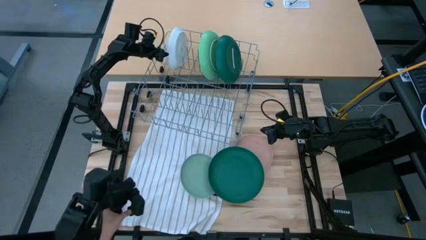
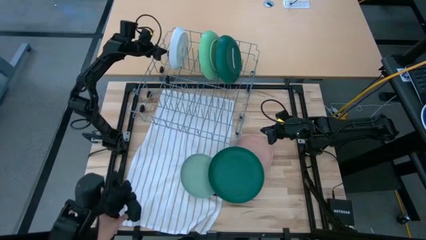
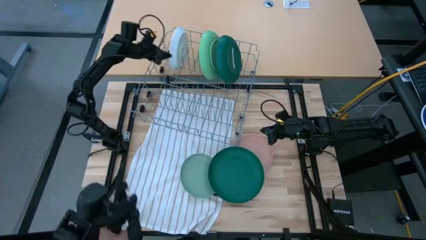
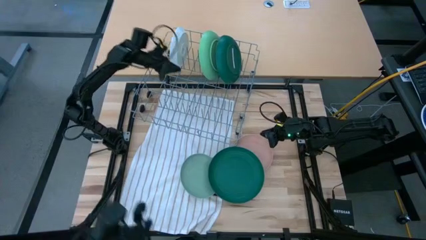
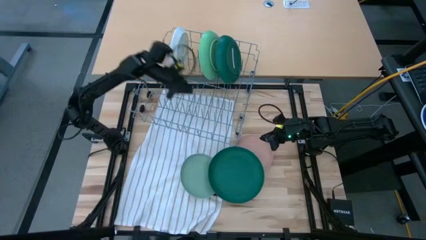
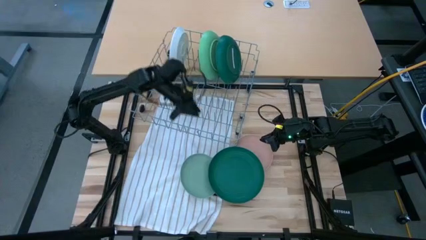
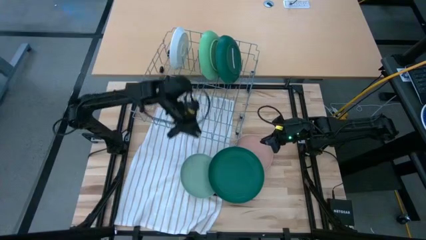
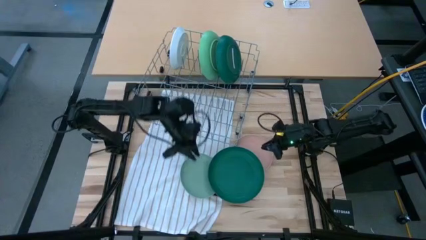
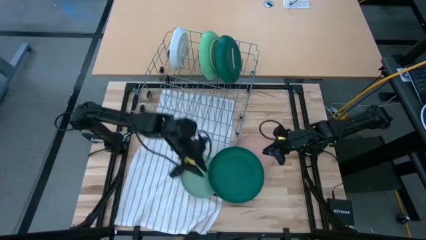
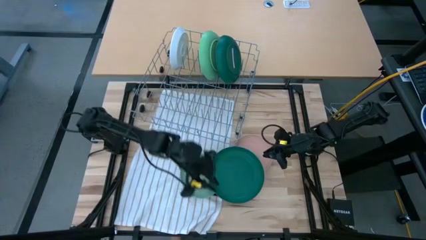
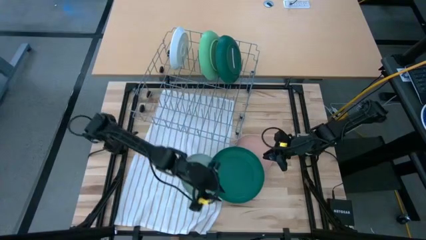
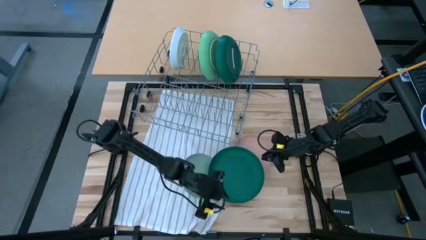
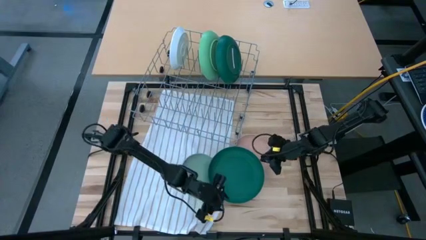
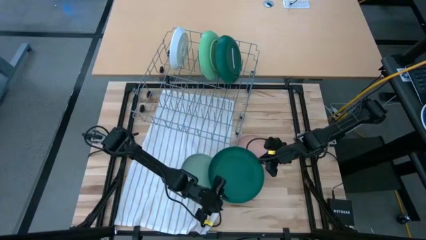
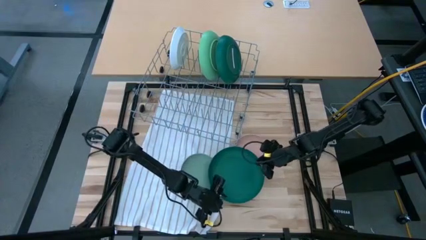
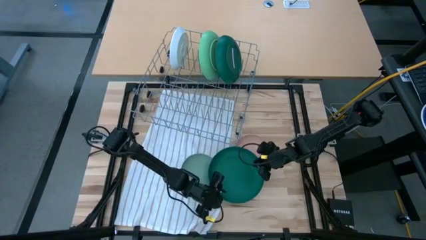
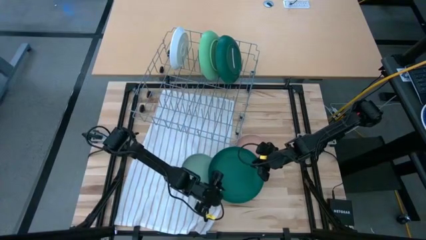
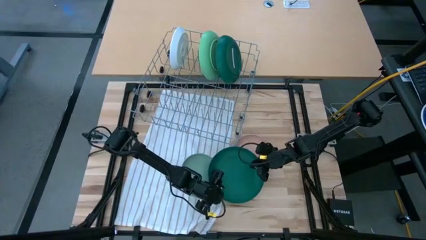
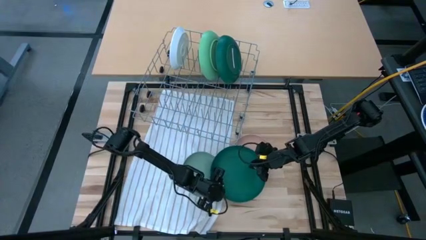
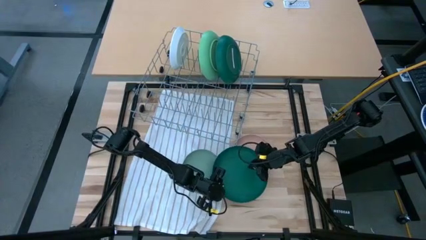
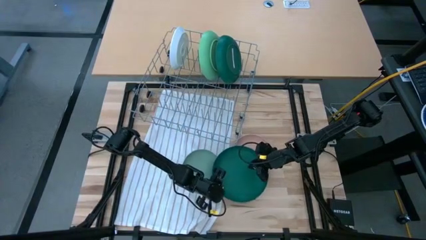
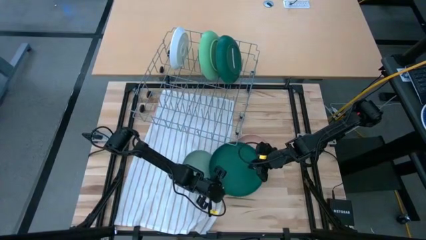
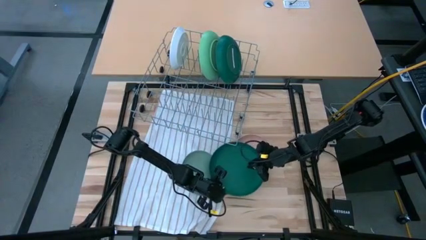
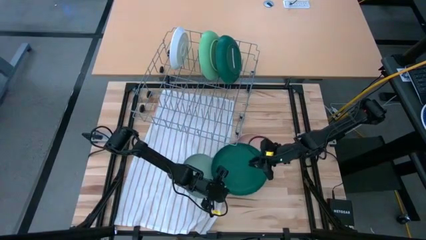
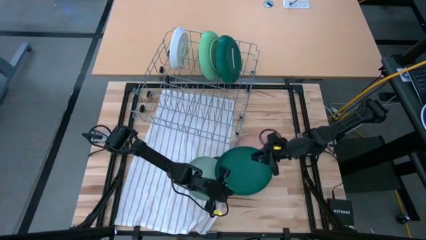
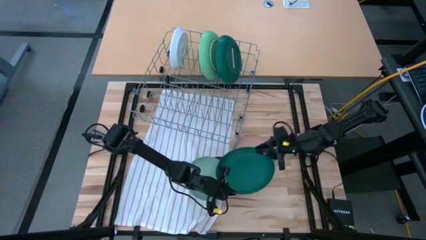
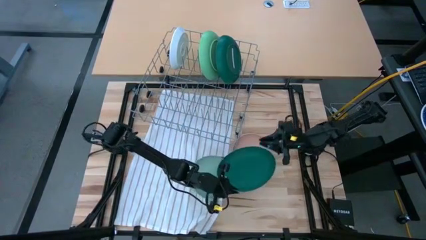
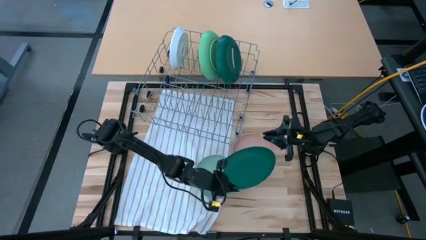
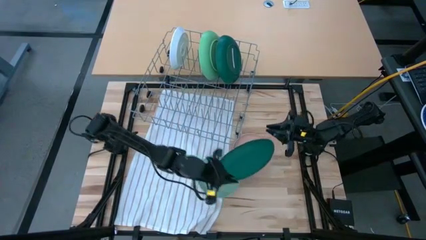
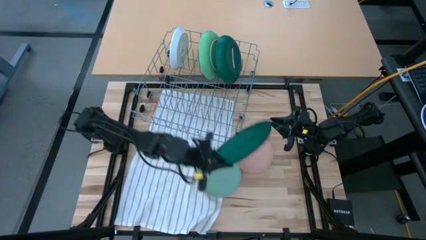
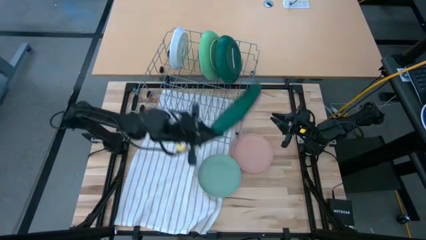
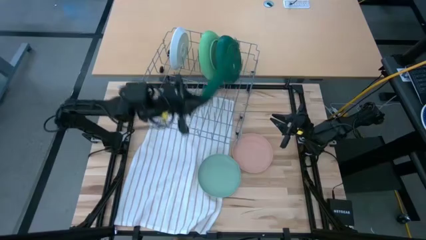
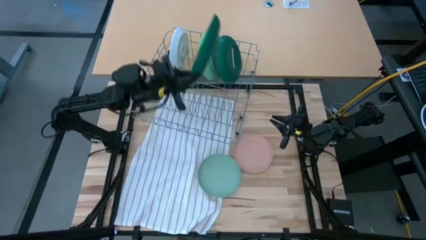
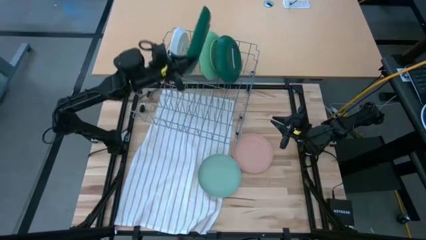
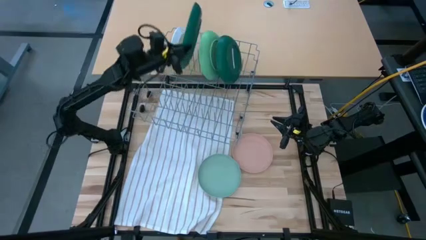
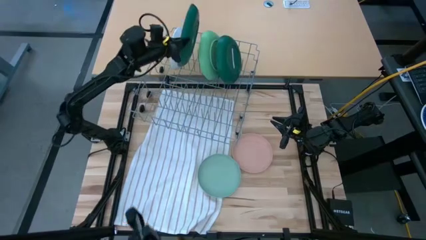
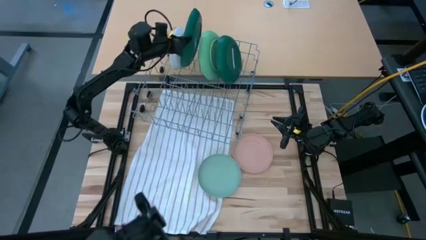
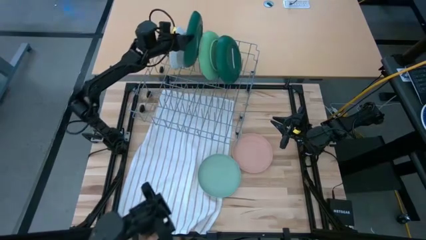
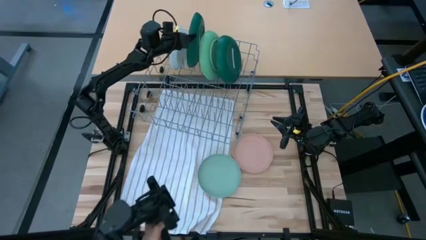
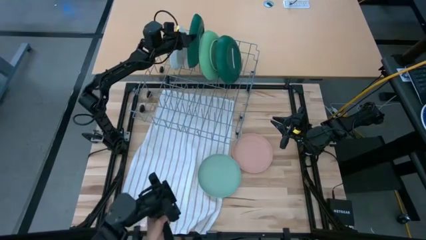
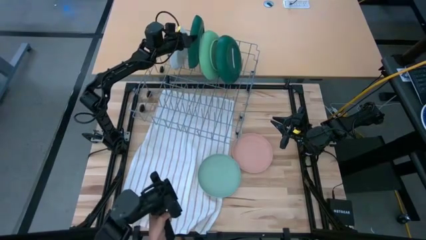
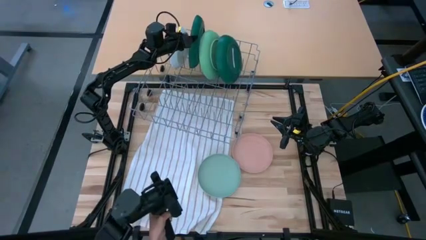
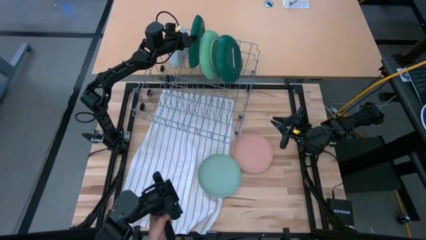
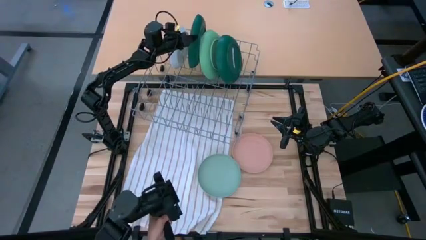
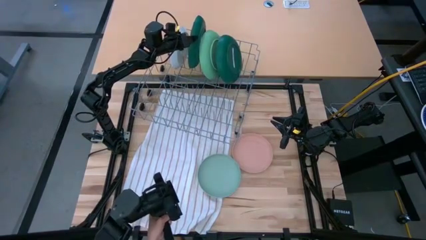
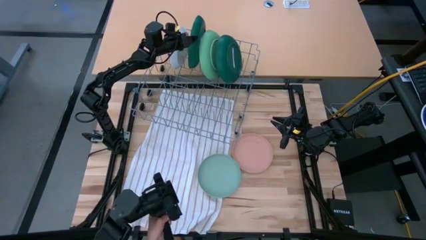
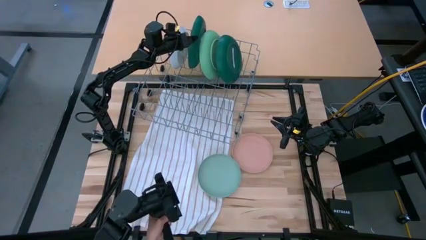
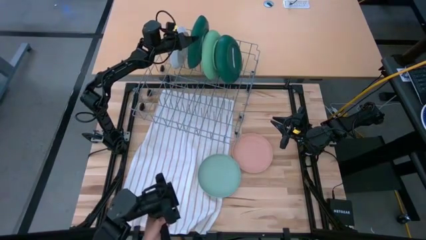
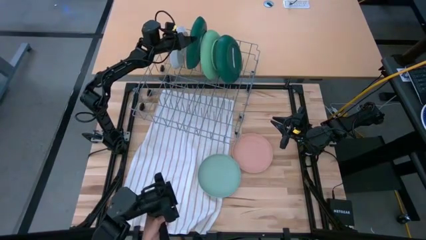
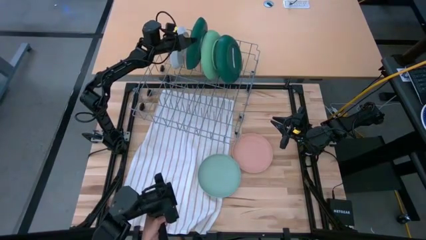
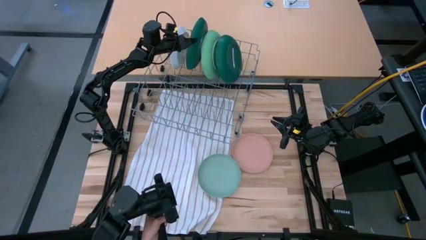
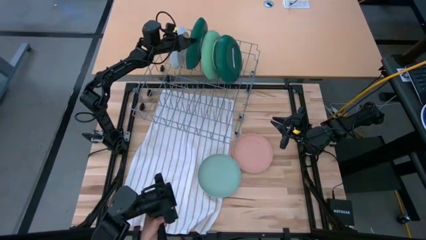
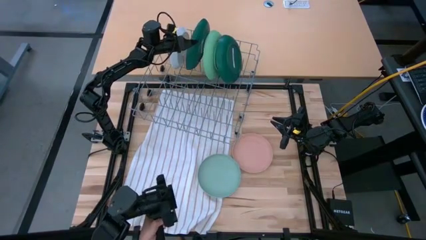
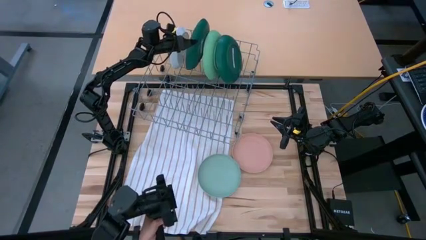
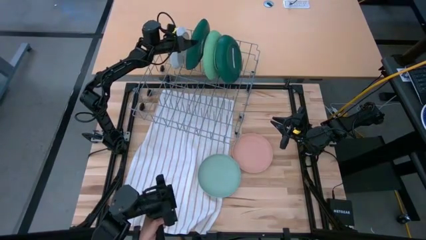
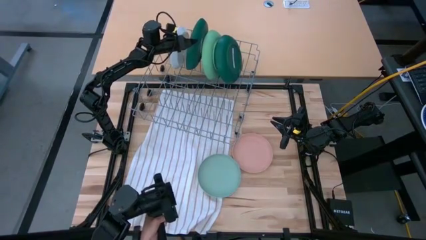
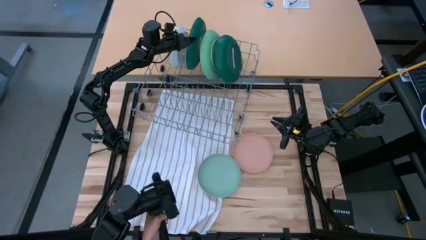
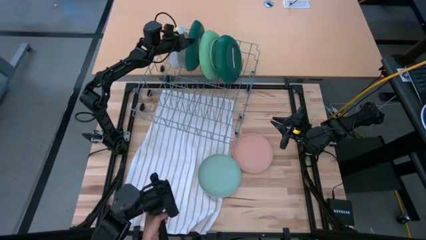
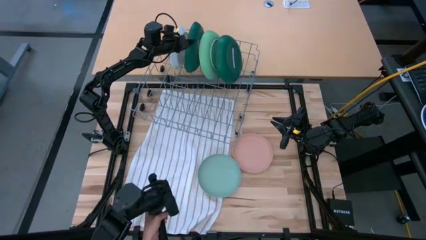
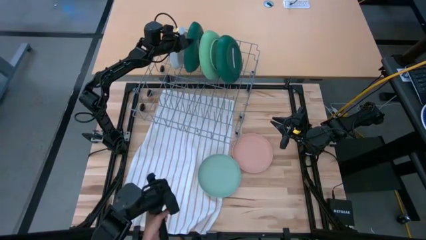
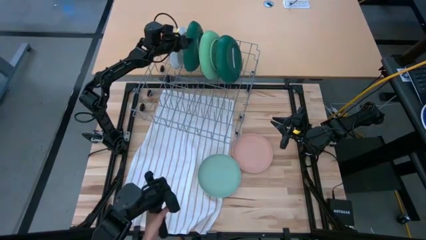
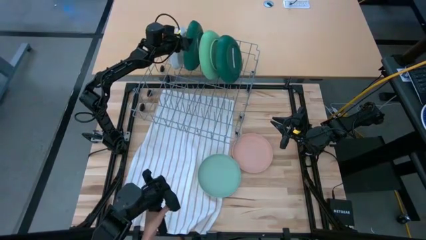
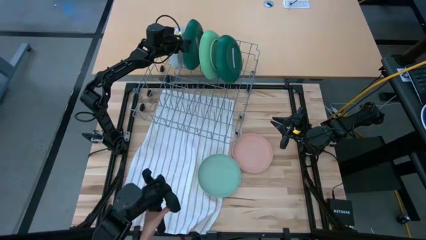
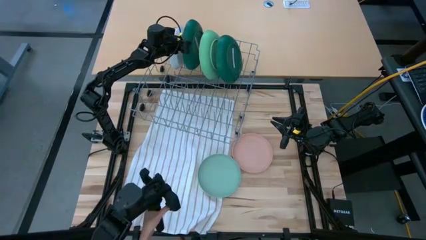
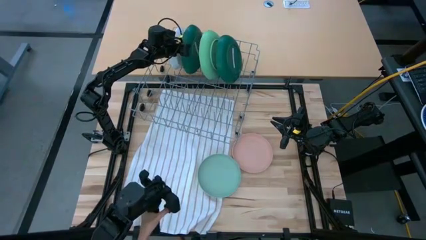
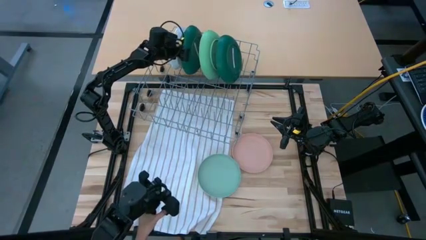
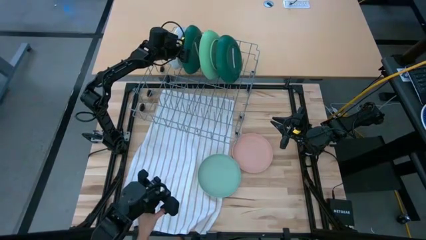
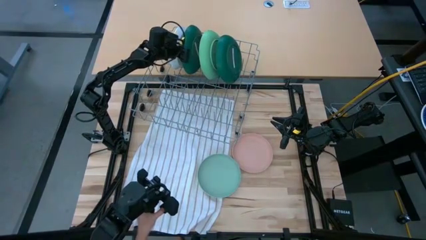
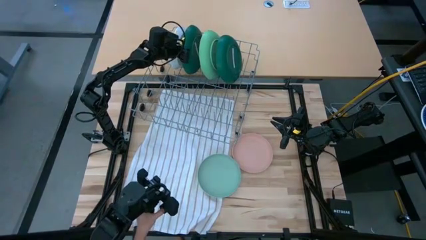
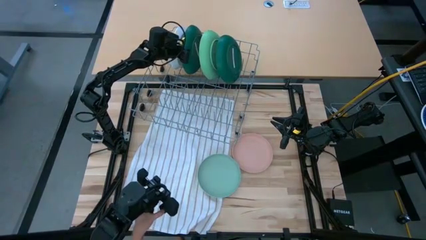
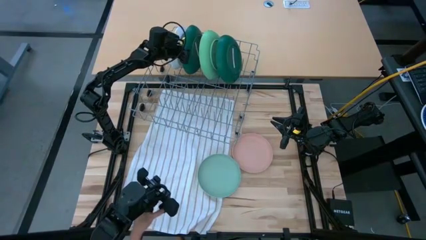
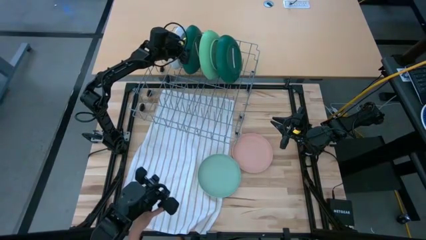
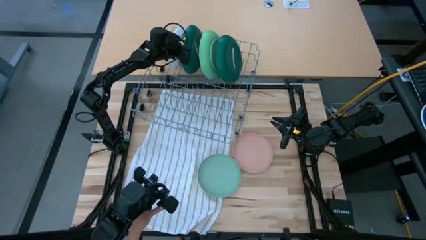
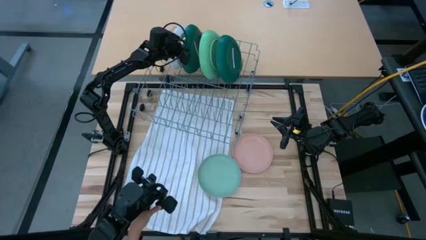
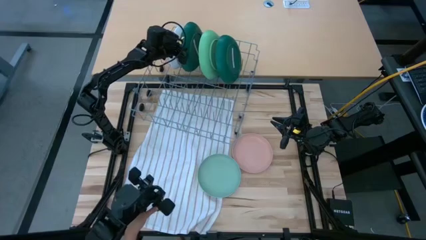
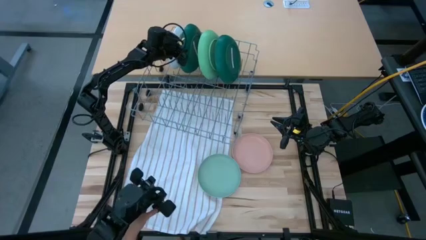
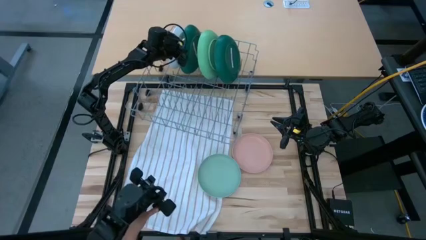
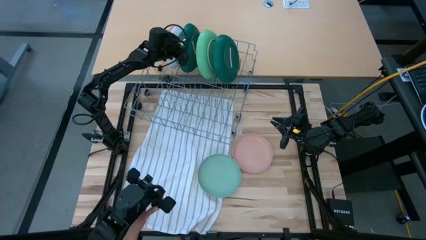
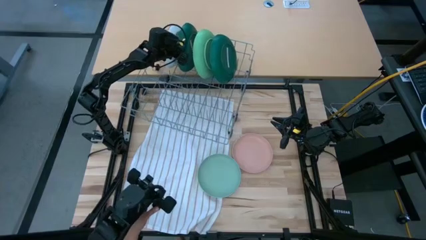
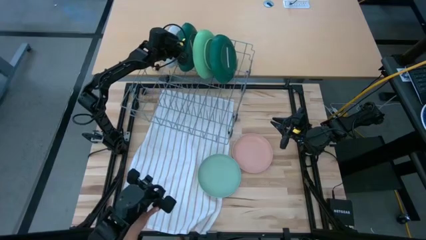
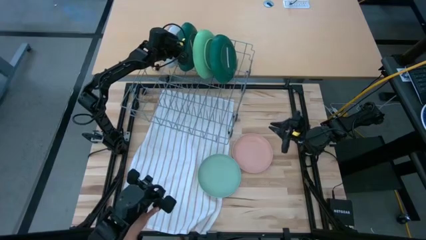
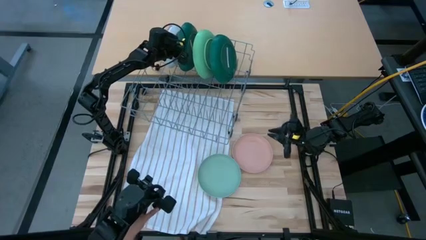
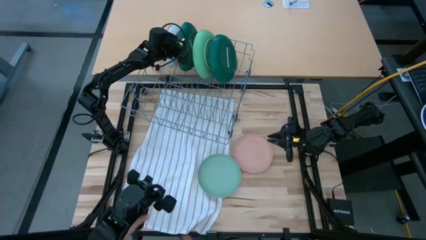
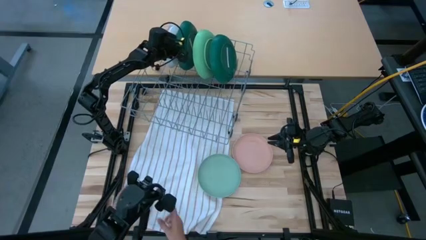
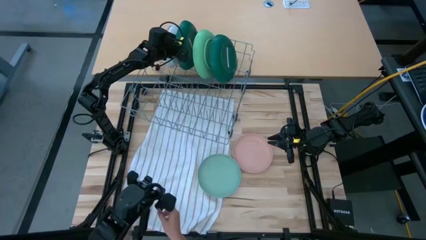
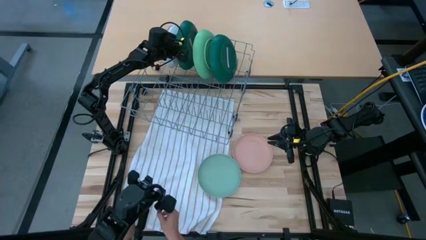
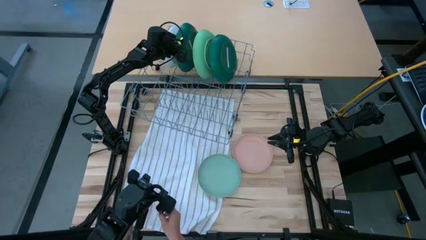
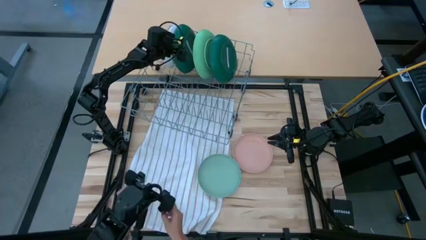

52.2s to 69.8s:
Task: Sort dishes
Put the dark green plate into the dishwasher rack
